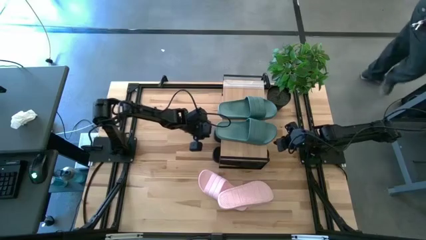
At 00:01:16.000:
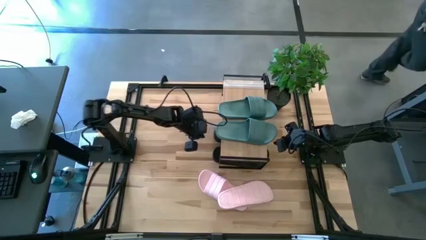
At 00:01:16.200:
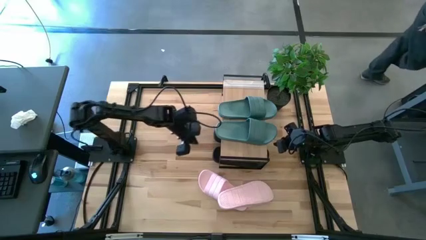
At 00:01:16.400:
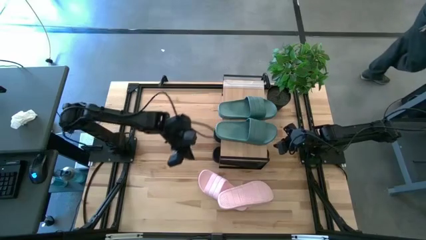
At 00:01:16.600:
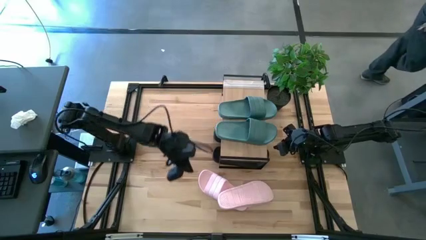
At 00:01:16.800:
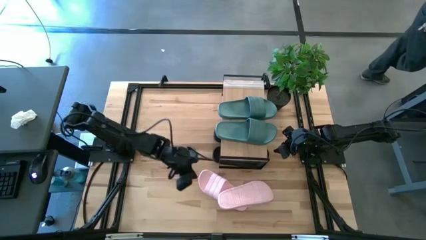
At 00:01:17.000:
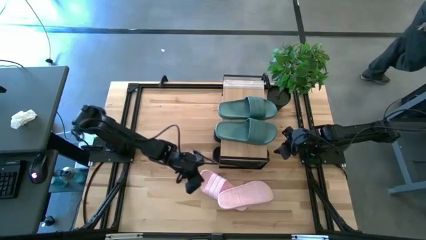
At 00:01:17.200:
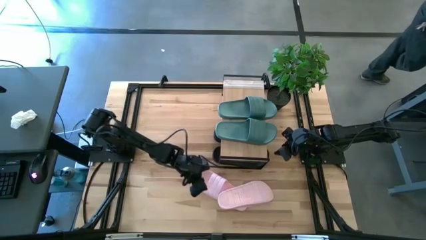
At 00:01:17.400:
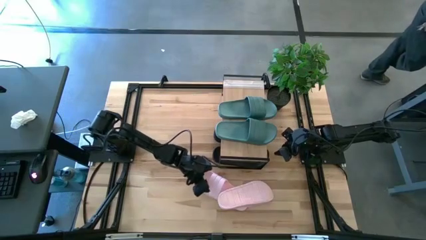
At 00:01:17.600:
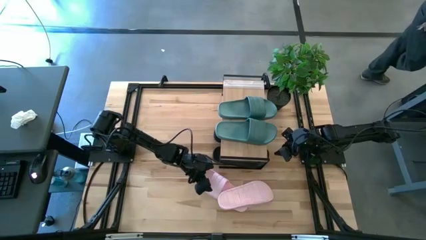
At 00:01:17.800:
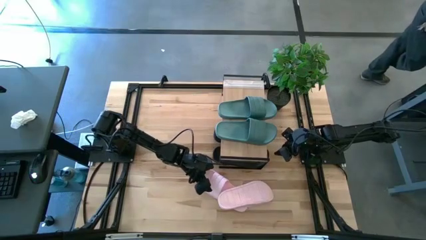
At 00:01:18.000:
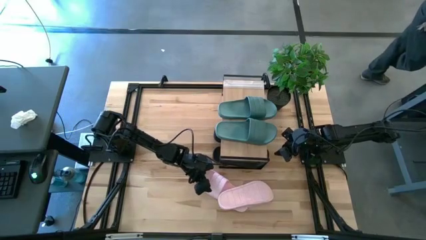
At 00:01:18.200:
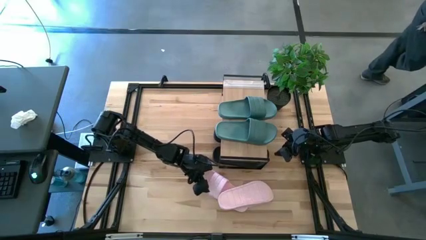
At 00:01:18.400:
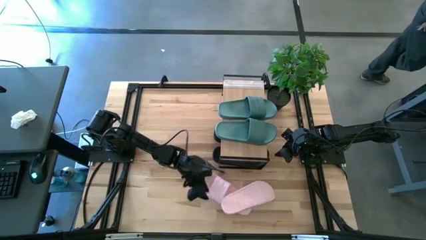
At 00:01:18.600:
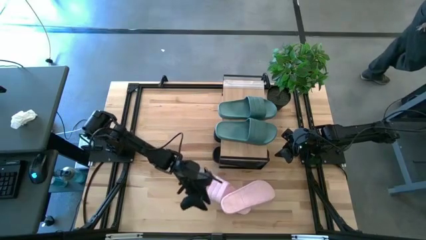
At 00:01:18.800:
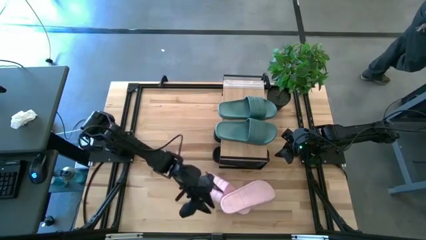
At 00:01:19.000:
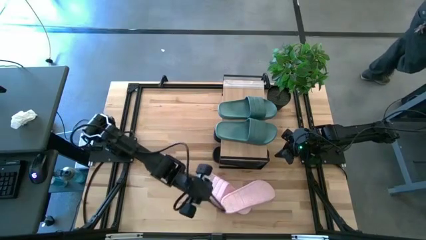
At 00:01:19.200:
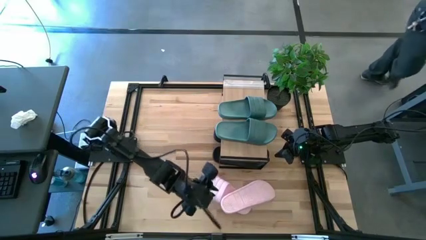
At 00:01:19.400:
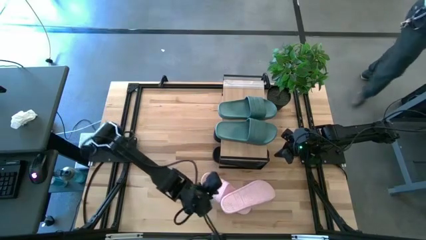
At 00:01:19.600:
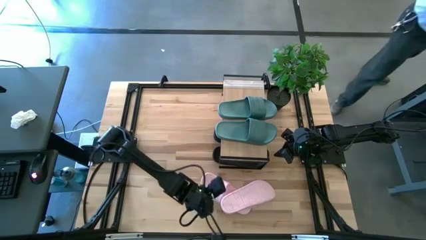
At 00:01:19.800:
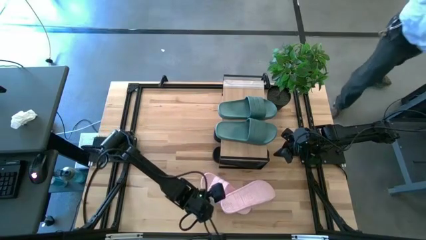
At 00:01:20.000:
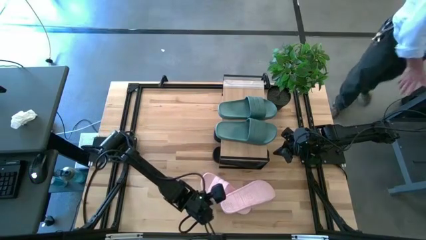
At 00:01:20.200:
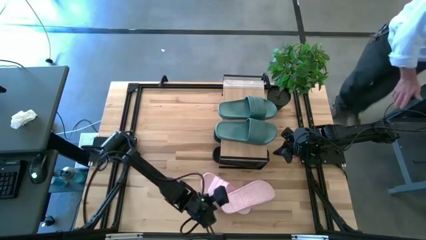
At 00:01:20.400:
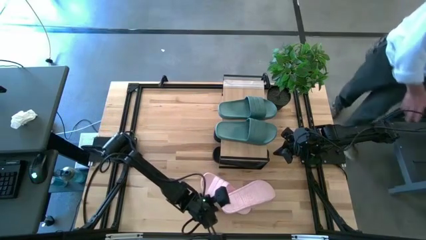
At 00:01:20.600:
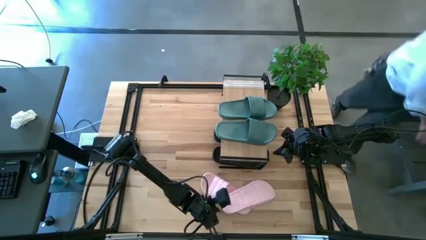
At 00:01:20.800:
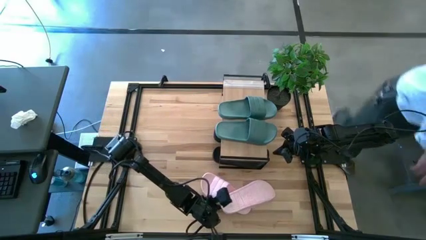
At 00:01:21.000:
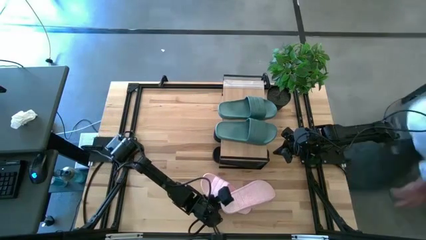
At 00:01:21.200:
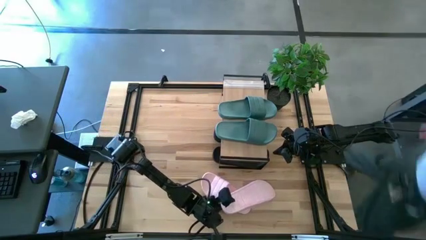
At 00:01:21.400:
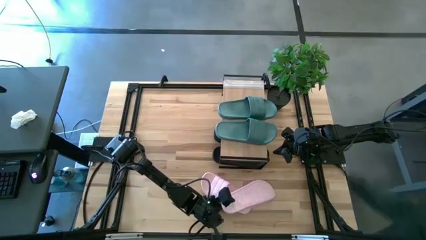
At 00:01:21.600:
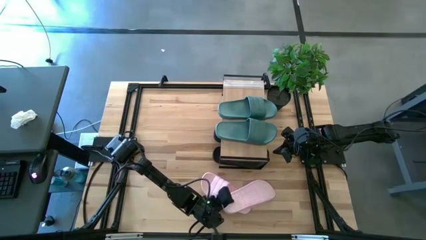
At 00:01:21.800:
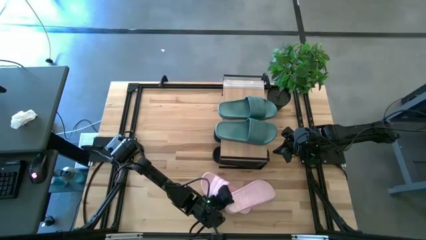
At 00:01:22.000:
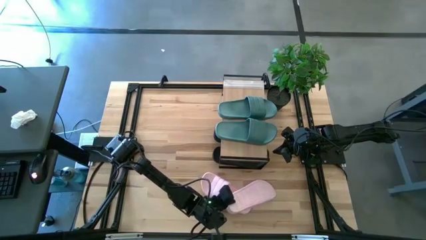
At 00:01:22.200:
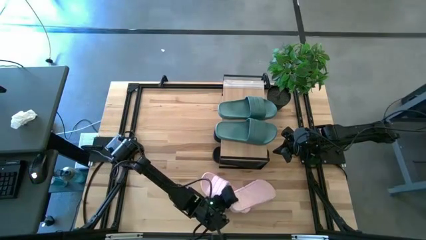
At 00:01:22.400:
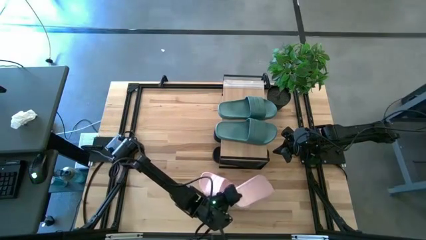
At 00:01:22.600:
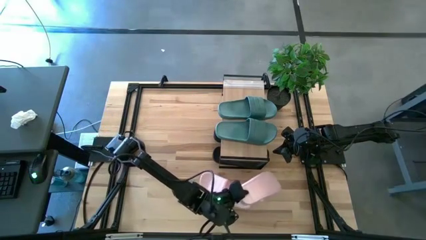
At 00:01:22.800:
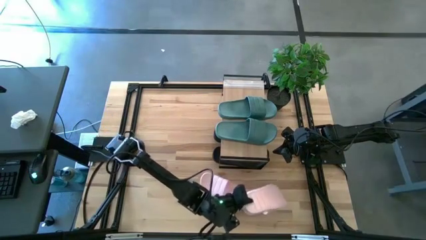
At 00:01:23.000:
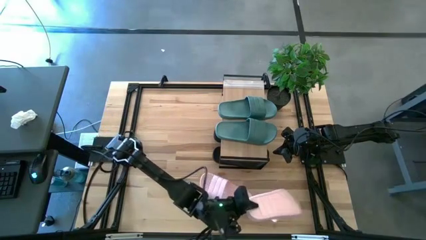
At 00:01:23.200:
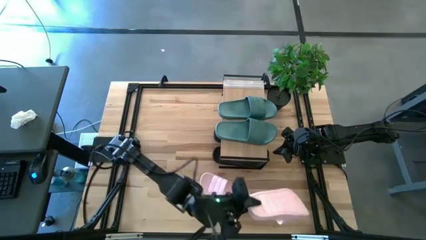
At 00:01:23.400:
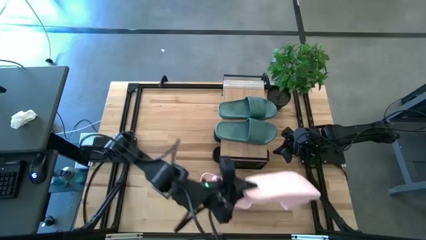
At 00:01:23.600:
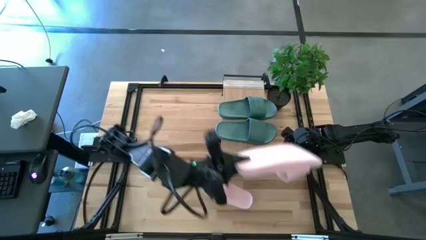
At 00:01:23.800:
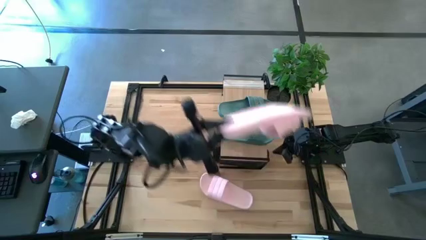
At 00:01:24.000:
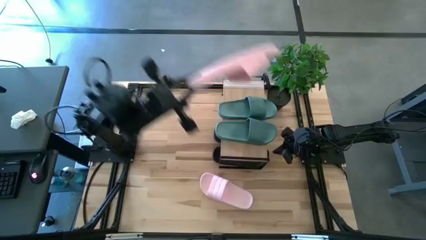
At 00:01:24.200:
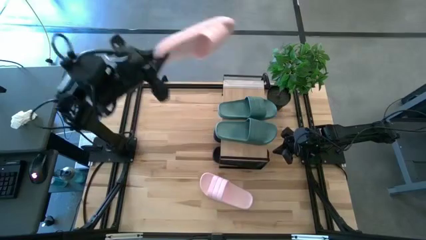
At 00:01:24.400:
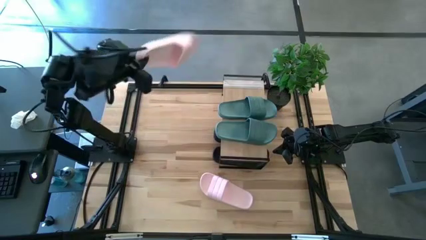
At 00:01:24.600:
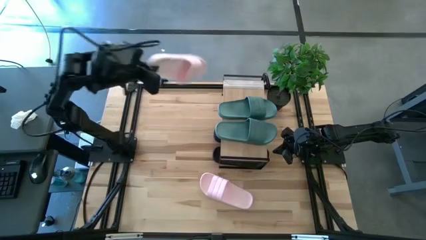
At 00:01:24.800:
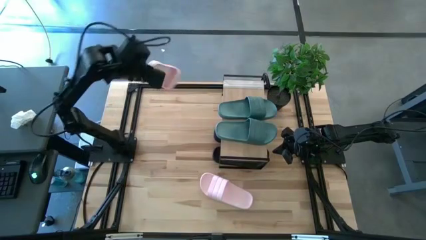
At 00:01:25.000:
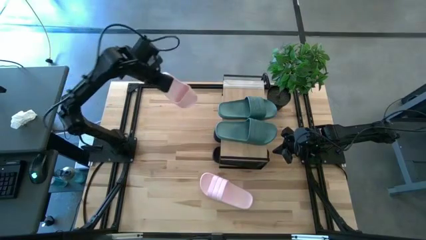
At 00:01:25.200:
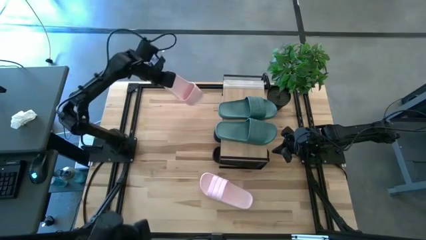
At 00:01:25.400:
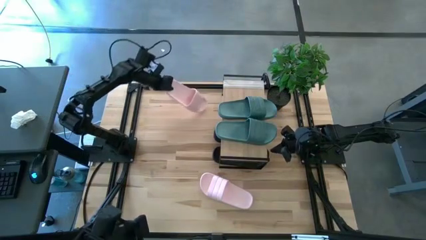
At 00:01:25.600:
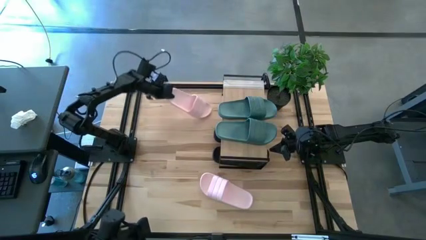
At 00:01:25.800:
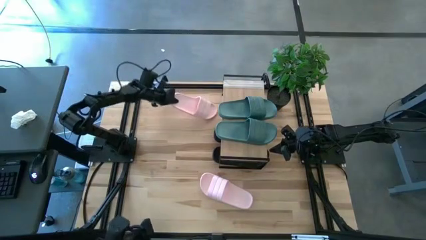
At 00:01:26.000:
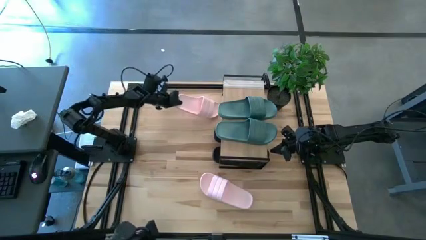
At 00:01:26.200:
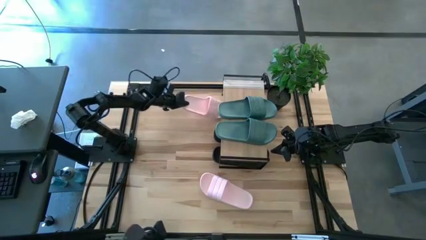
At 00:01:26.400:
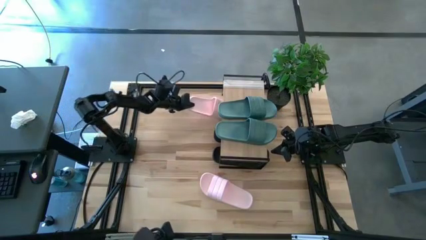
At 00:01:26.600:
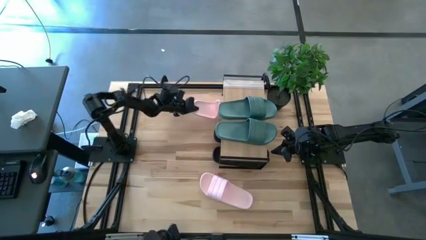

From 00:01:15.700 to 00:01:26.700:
Task: Pick and place slides into the shelf
Put the top pink slipper under the shelf

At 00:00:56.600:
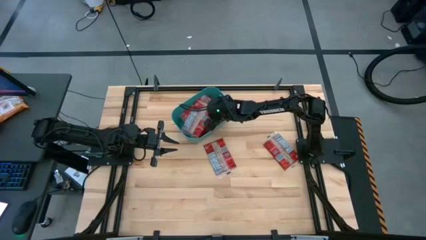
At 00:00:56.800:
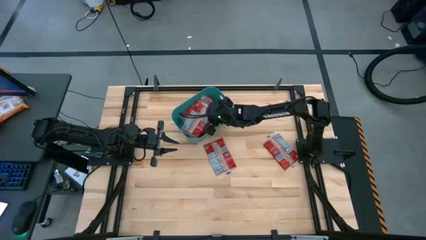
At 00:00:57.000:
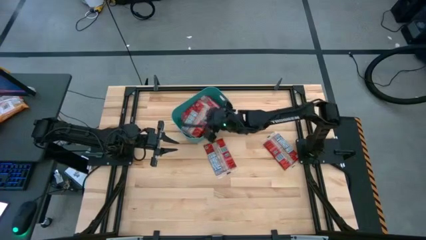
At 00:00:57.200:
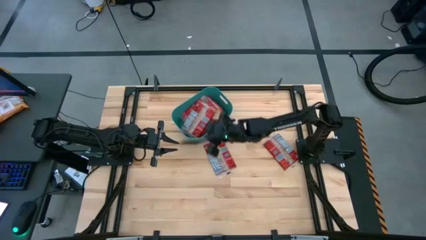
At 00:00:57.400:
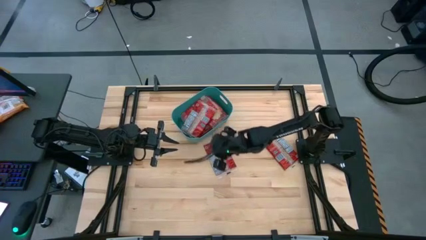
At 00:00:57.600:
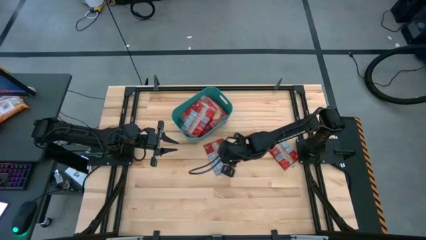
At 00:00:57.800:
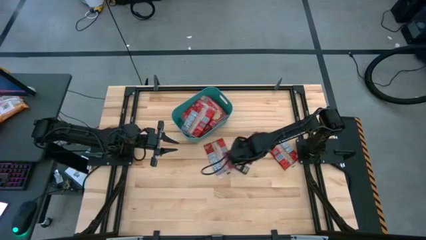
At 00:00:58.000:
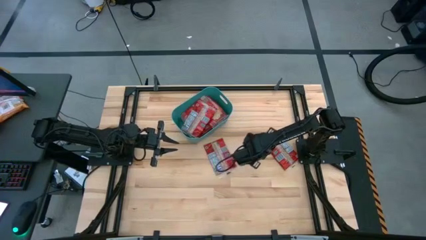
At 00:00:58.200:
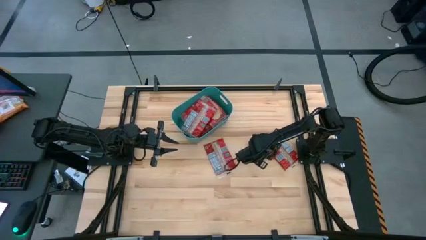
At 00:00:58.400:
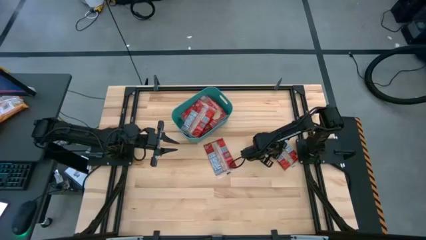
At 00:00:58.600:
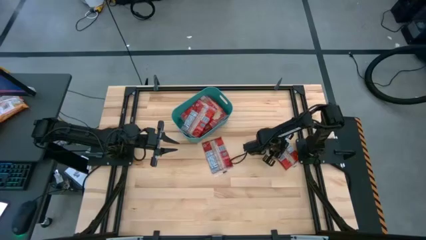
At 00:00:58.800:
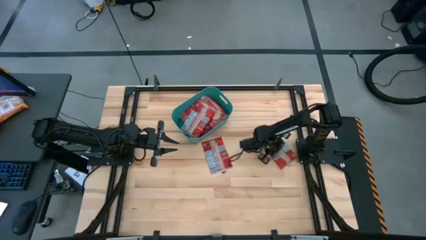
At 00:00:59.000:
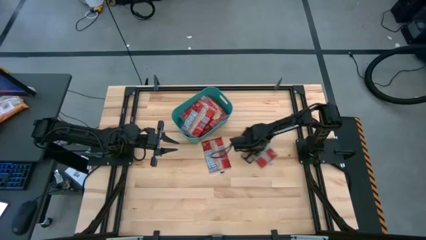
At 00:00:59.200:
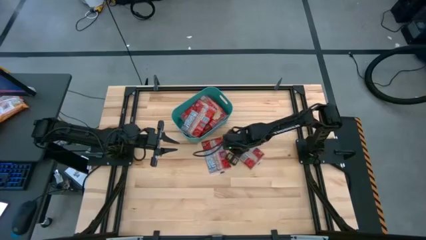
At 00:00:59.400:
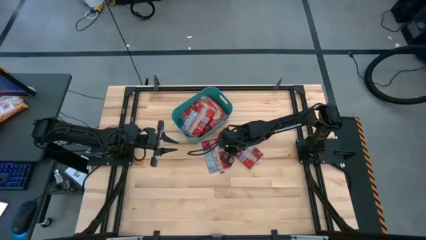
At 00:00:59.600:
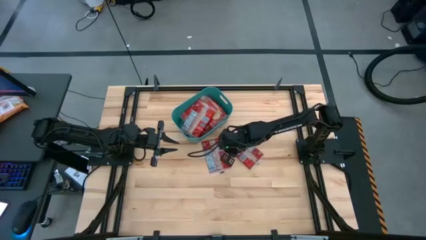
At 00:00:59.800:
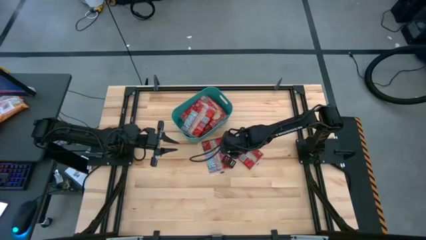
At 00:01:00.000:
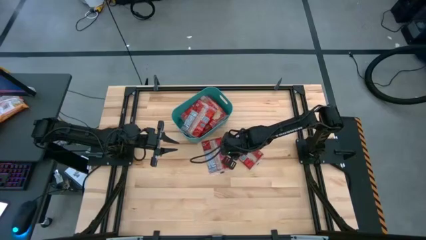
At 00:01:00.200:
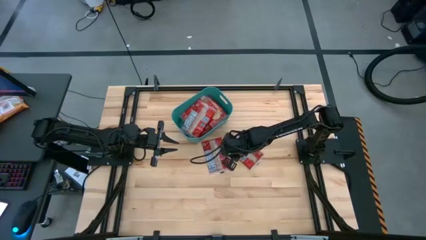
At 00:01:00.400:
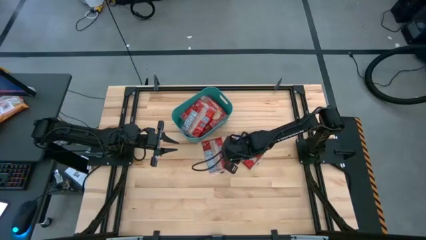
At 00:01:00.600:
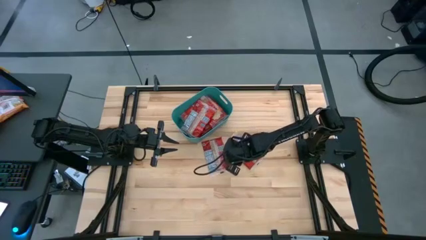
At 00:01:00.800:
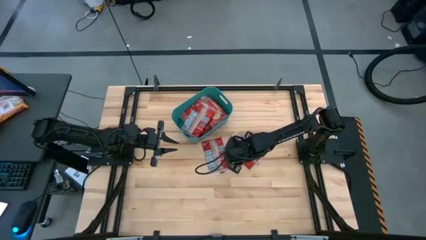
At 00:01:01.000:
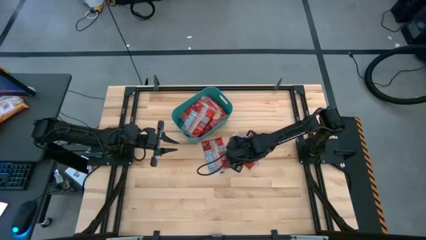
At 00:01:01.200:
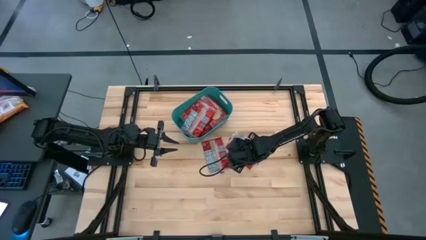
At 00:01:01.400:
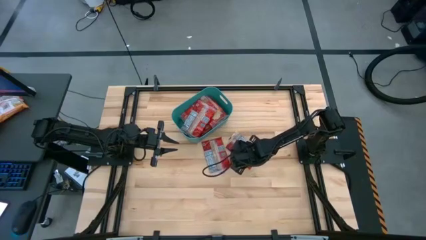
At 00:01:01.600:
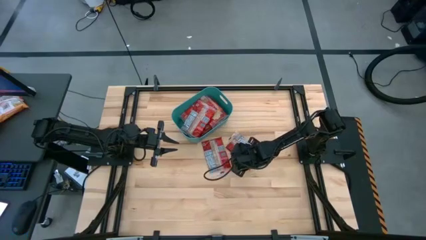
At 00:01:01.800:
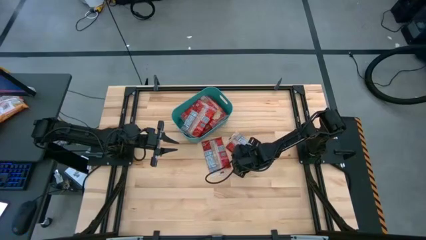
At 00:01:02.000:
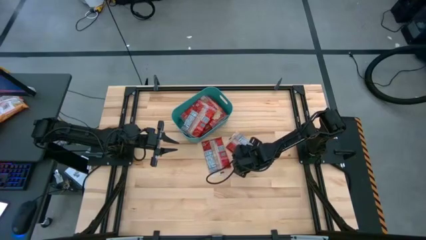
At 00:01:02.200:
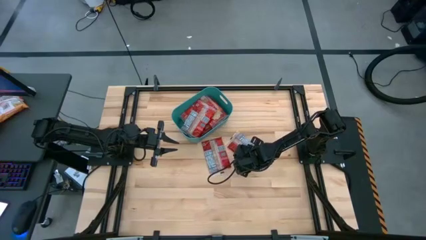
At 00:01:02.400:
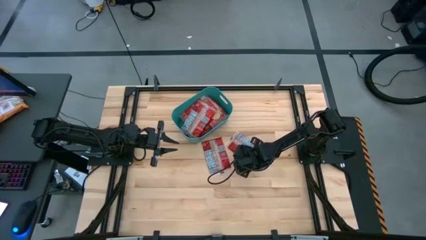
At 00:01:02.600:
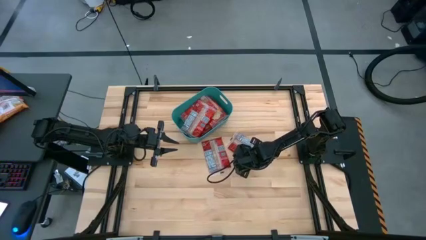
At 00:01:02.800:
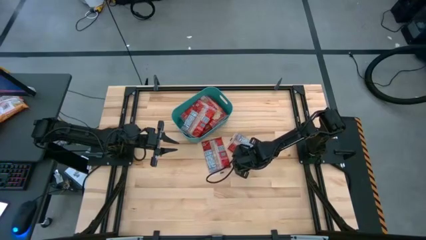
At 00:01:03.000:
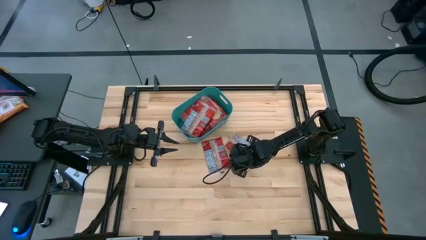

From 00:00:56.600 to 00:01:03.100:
Task: Sort popcorn bags into baskets
Put the red popcorn bag into the green container
